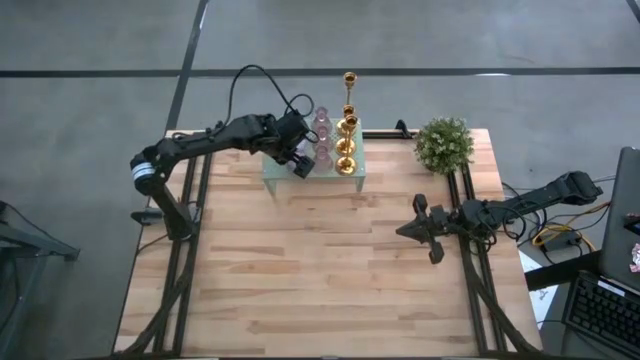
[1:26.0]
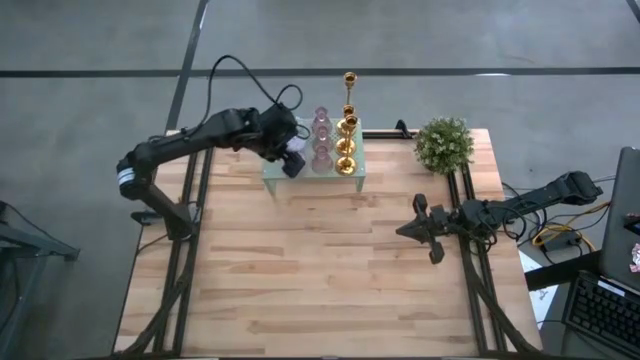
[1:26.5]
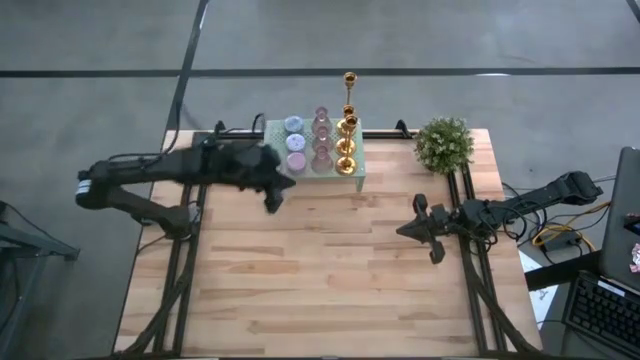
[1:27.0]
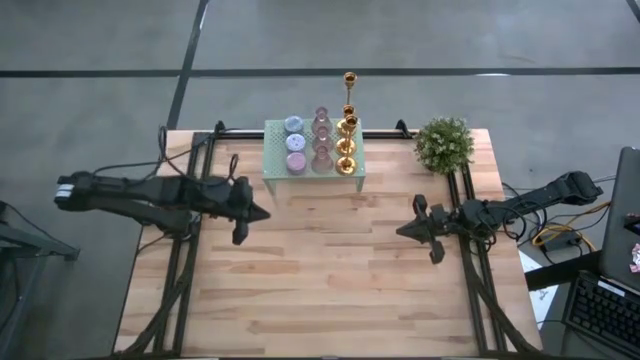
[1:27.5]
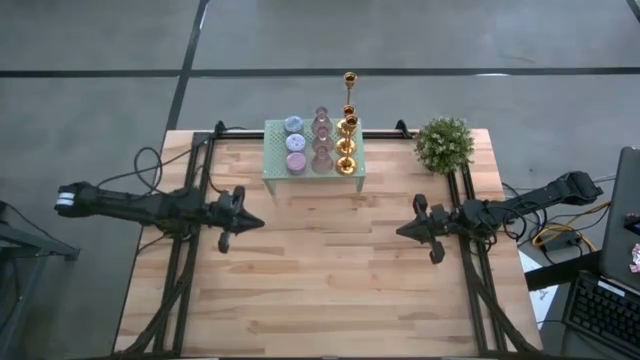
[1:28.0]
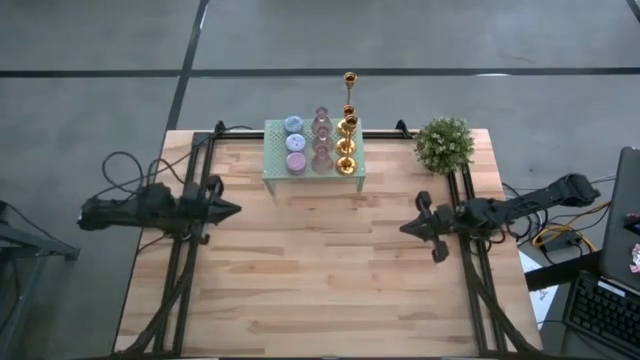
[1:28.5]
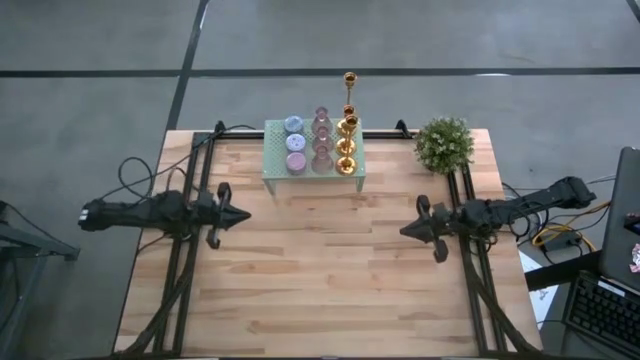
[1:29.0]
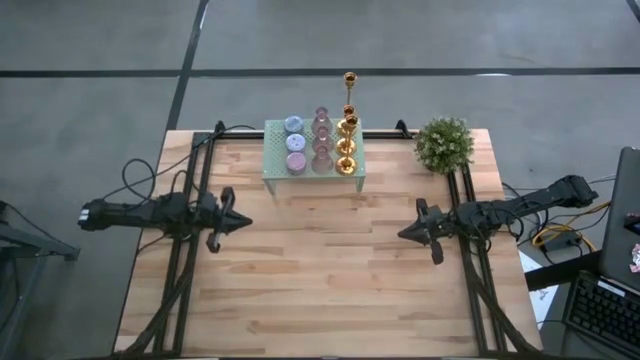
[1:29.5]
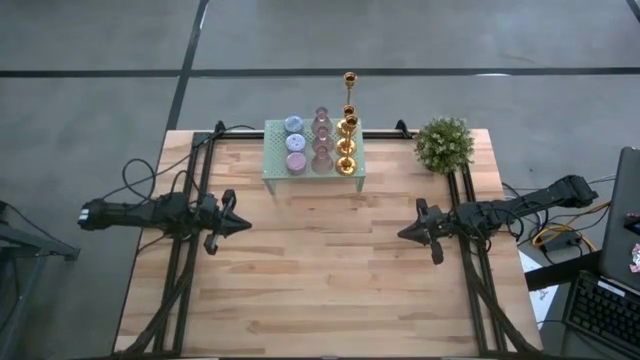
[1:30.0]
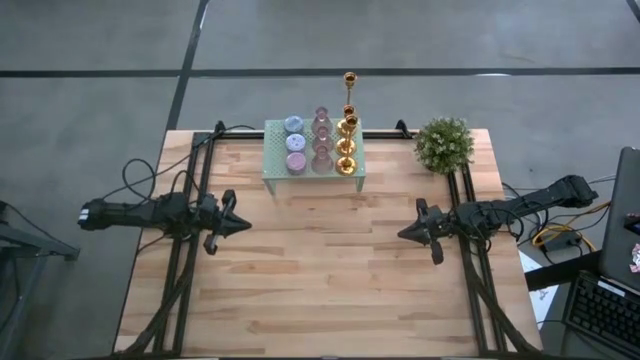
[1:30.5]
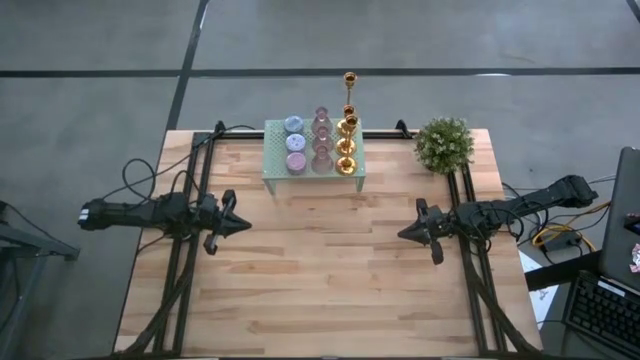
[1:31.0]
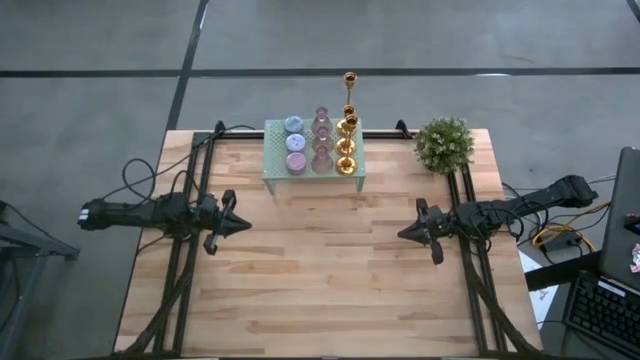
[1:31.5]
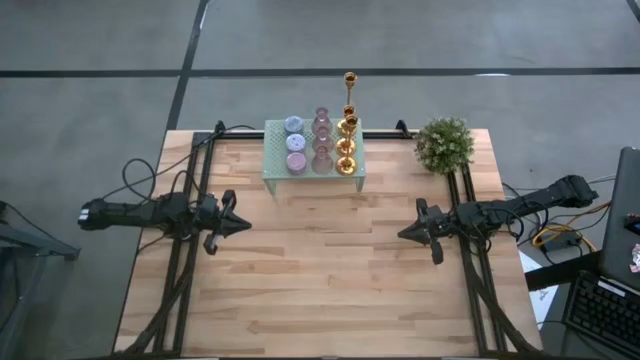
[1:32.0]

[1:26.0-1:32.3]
Task: Pick & Place candle stick holders
Return to Home Position

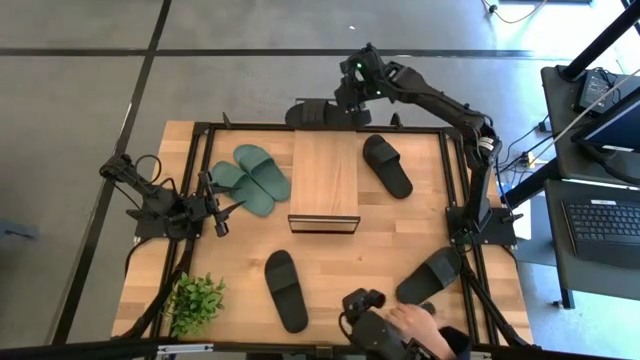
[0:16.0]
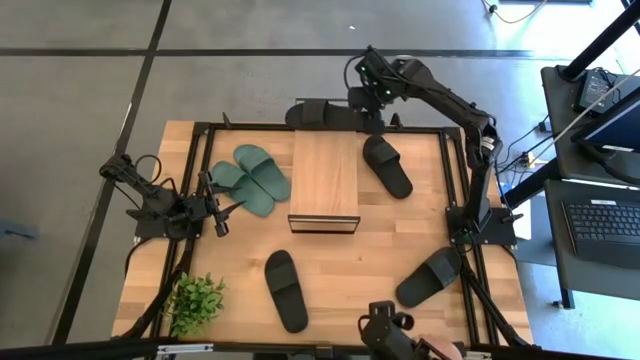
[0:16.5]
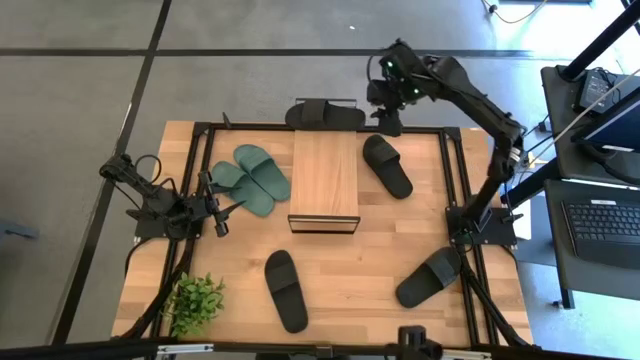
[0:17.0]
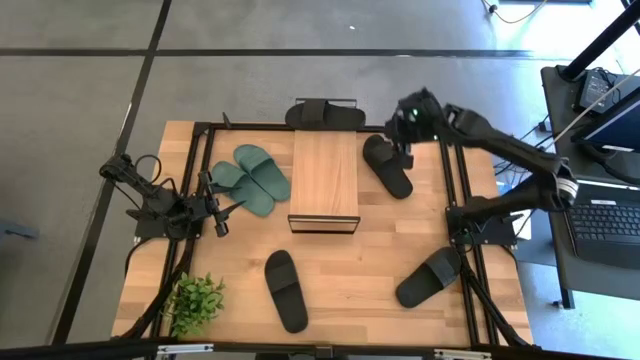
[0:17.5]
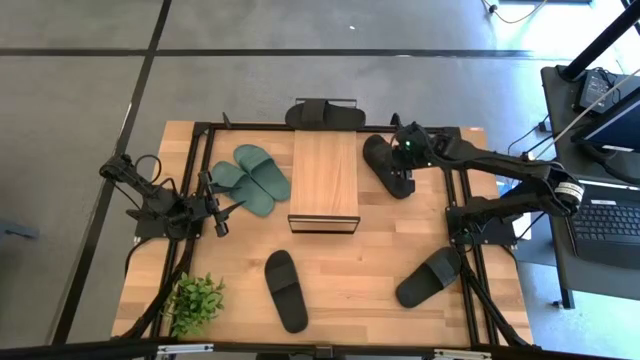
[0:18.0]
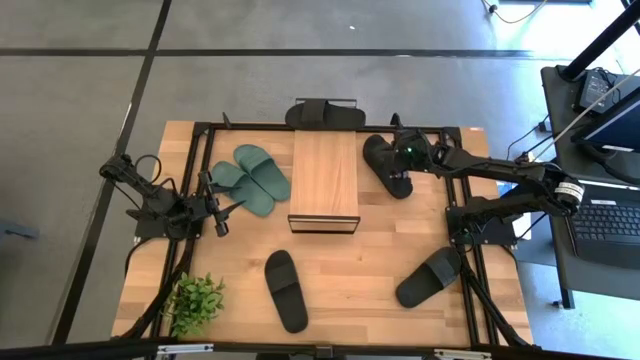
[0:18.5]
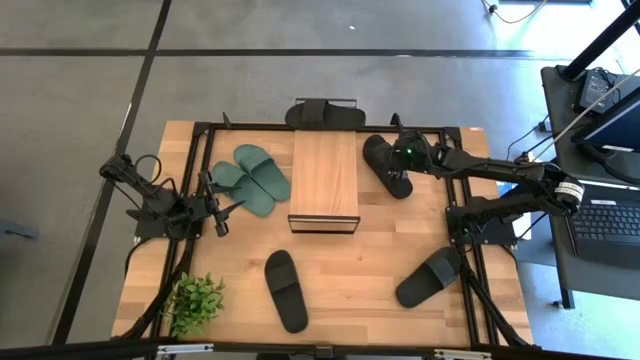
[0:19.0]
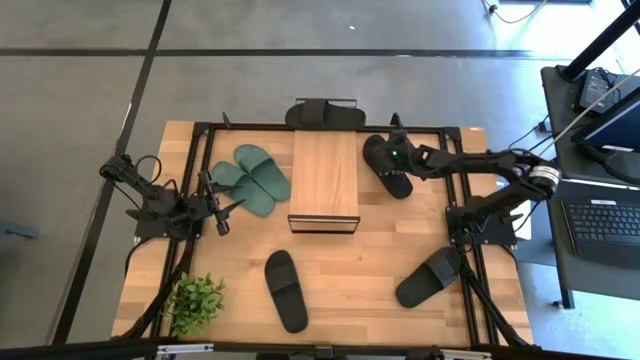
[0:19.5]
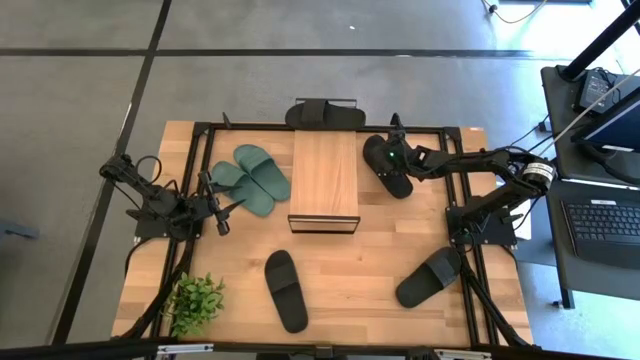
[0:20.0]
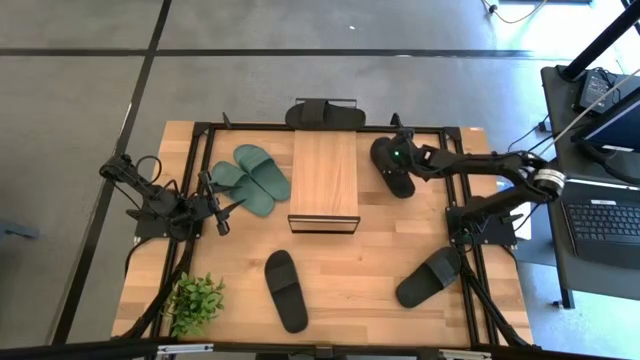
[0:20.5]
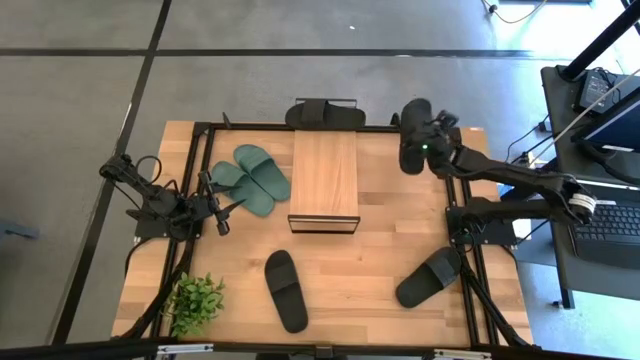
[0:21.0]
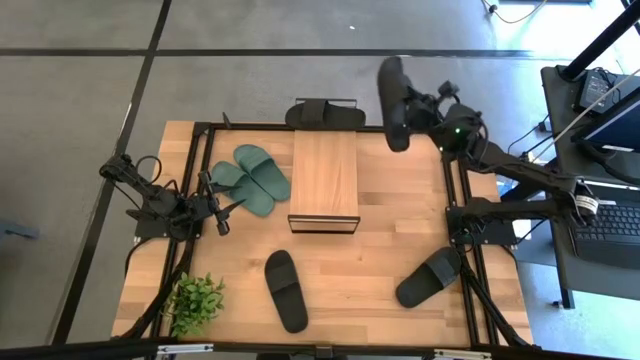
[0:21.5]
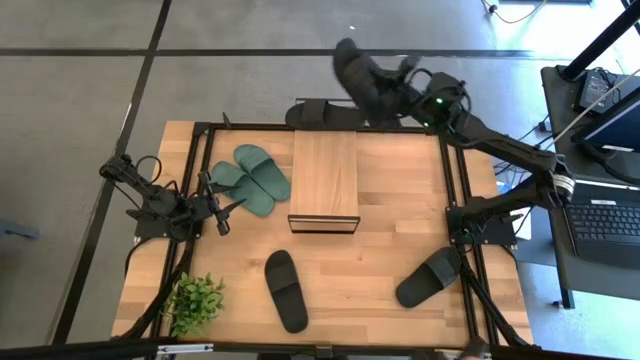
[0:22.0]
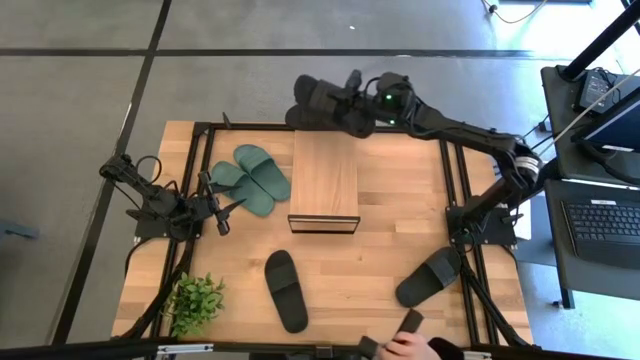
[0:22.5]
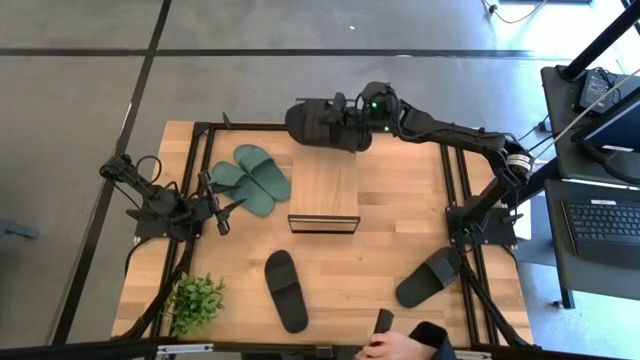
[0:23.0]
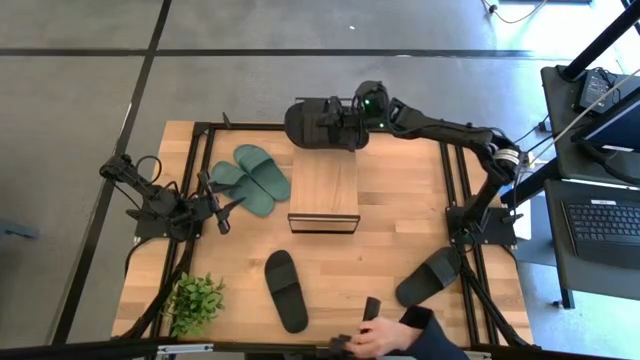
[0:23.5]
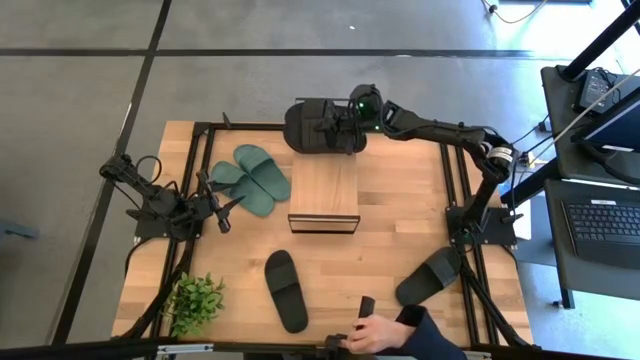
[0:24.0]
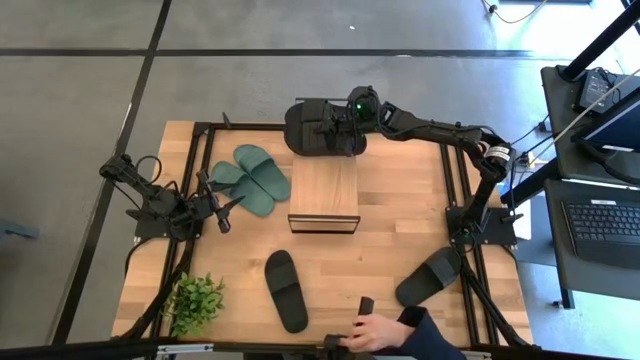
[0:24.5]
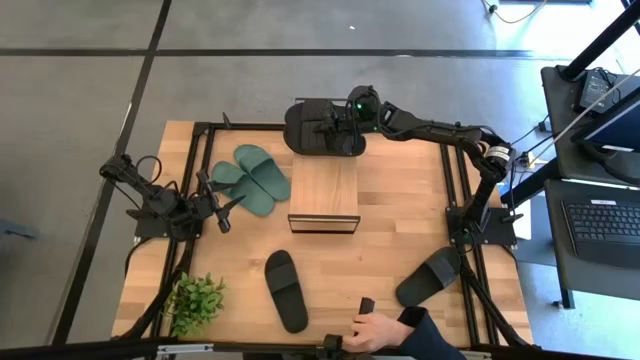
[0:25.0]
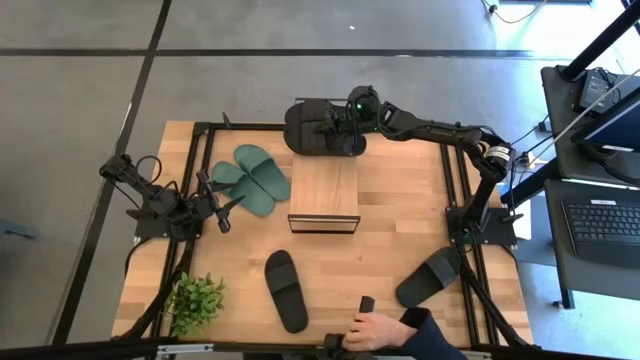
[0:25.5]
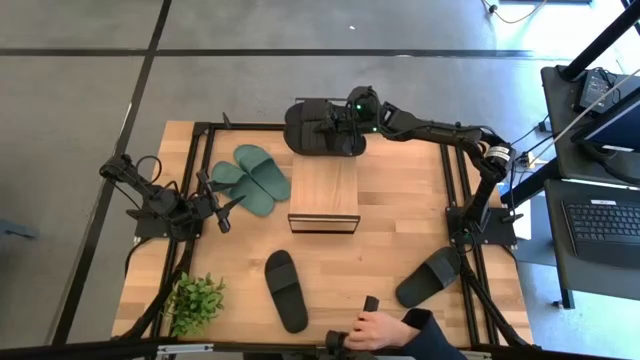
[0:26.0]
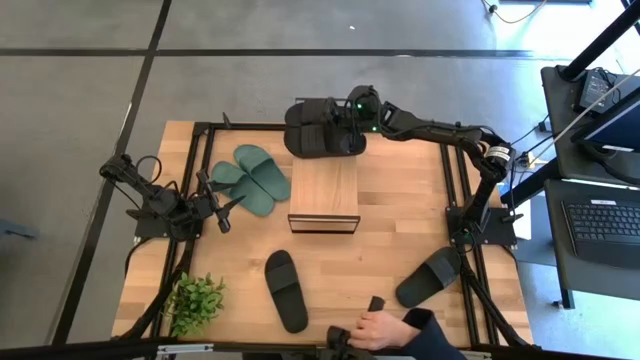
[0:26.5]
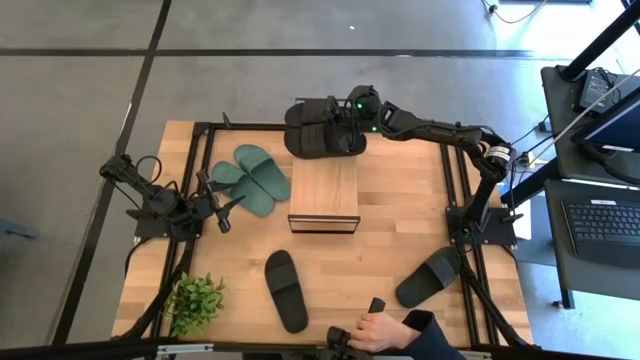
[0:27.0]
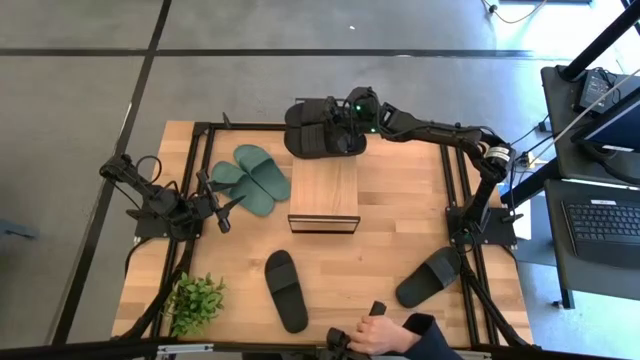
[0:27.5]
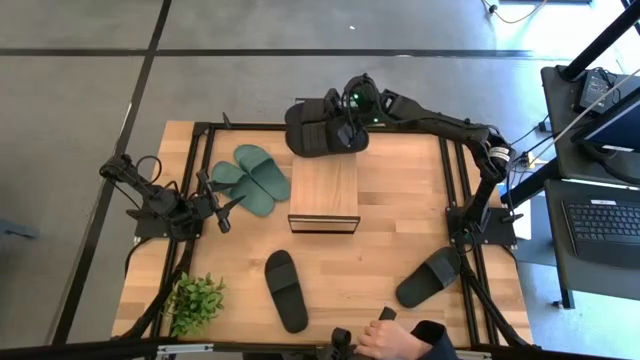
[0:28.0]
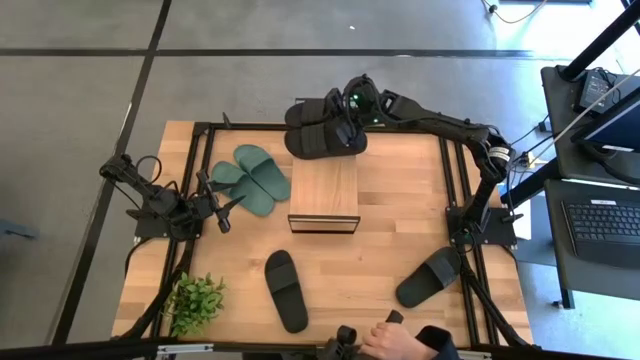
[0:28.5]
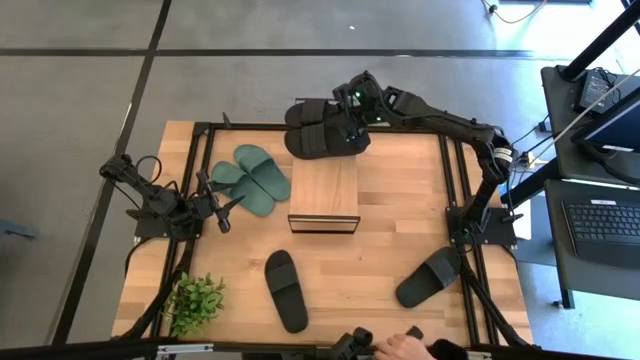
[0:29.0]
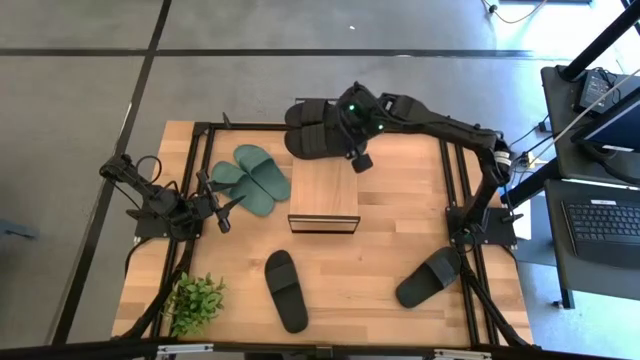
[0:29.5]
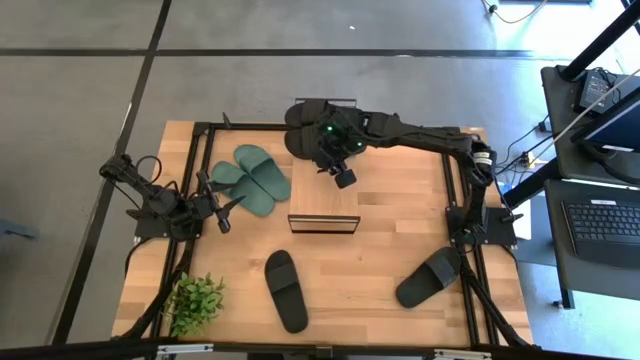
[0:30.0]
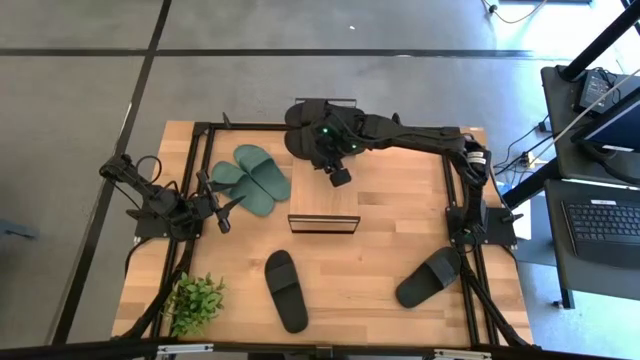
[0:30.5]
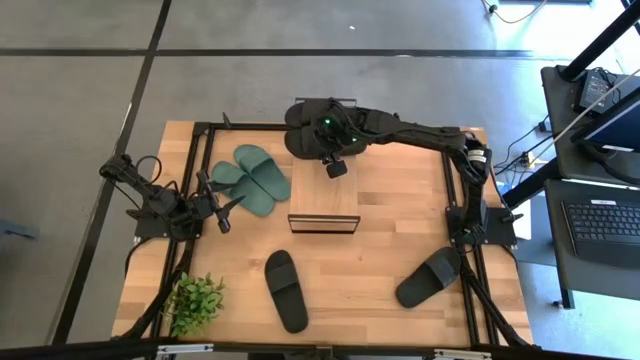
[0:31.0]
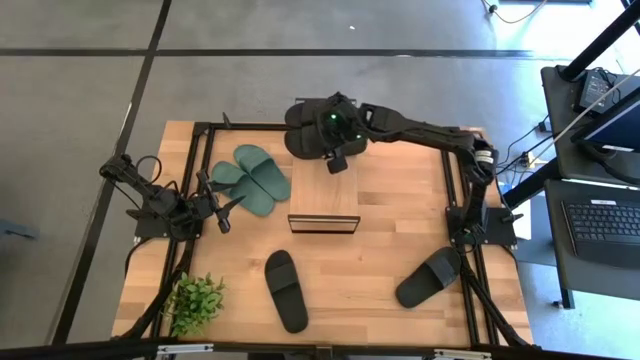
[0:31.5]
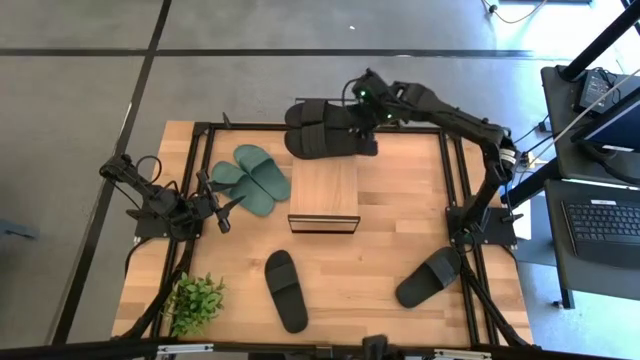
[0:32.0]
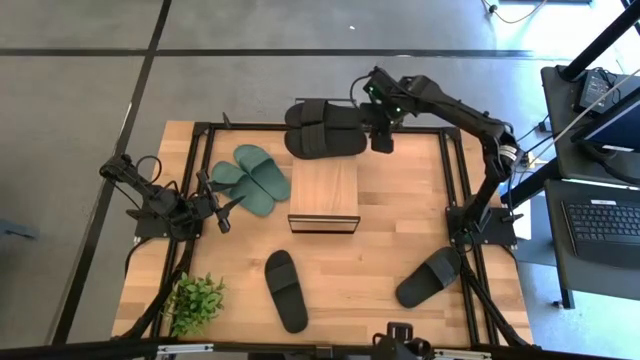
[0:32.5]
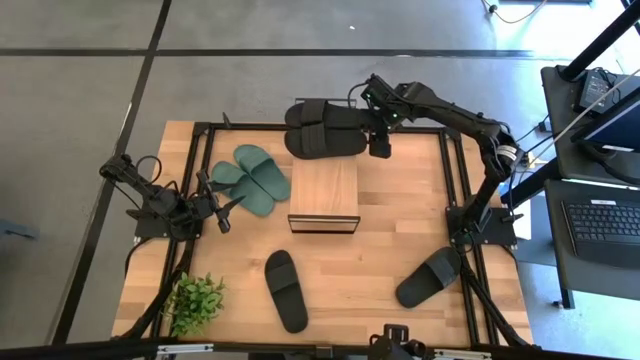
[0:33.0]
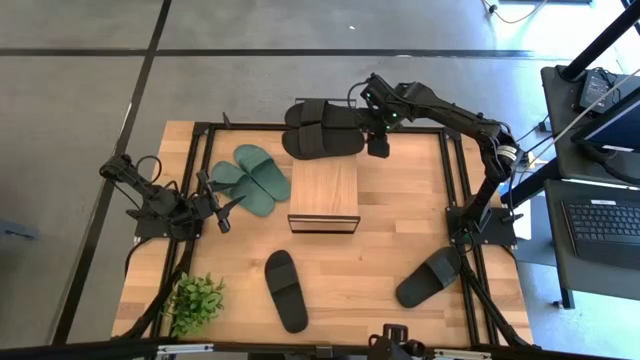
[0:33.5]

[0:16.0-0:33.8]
Task: Pick and place slides into the shelf
Put the black slide on the shelf
